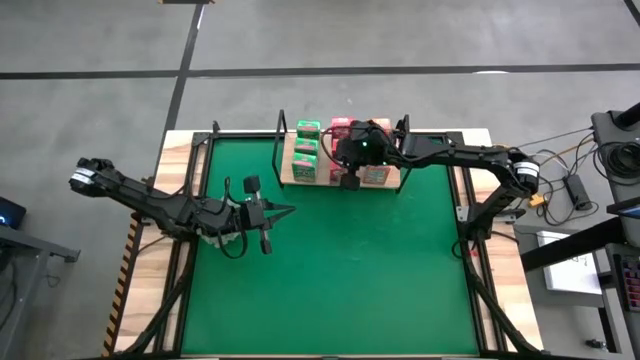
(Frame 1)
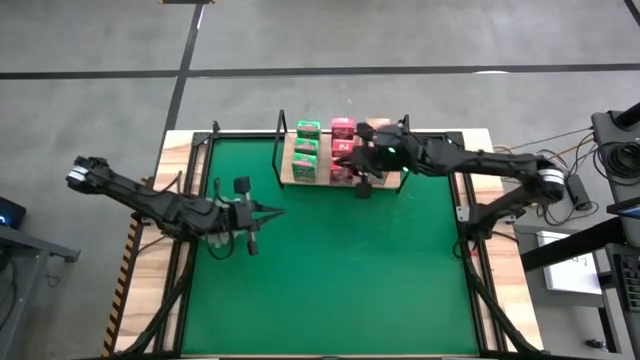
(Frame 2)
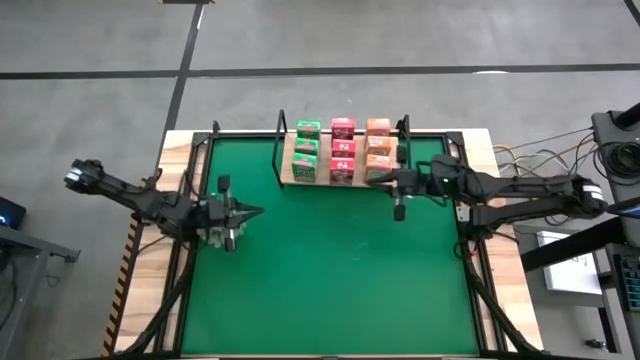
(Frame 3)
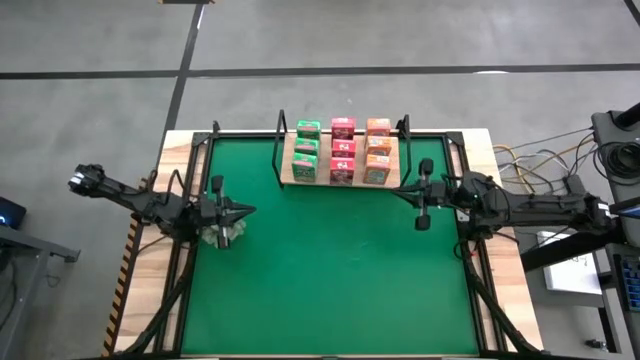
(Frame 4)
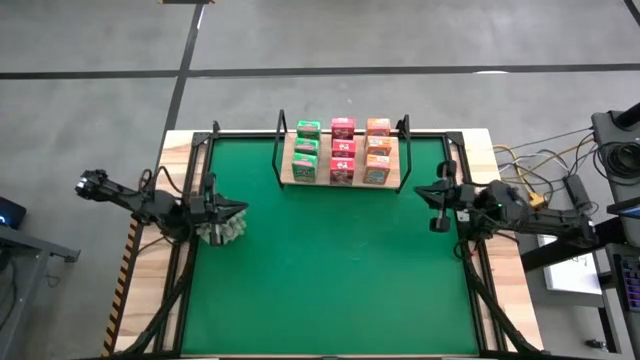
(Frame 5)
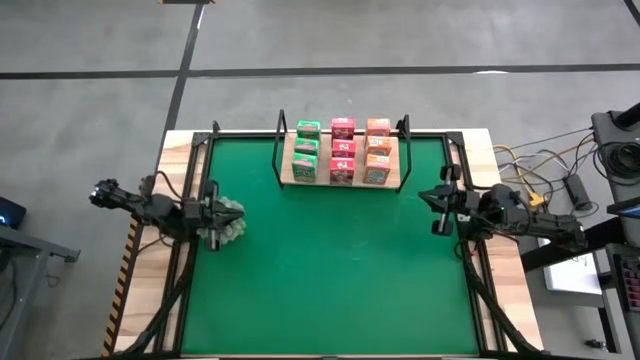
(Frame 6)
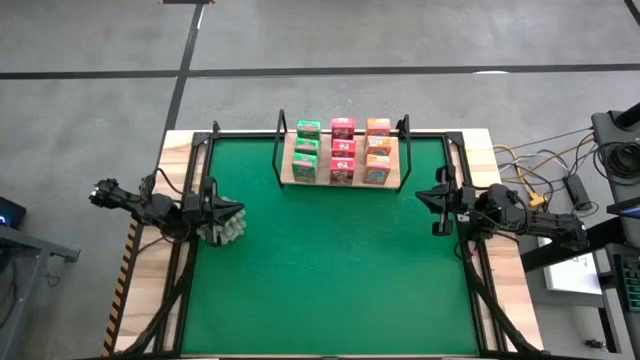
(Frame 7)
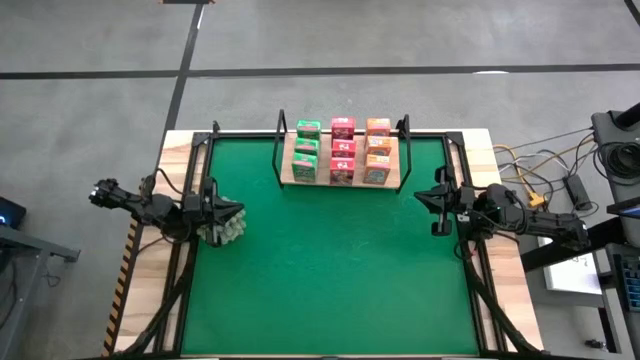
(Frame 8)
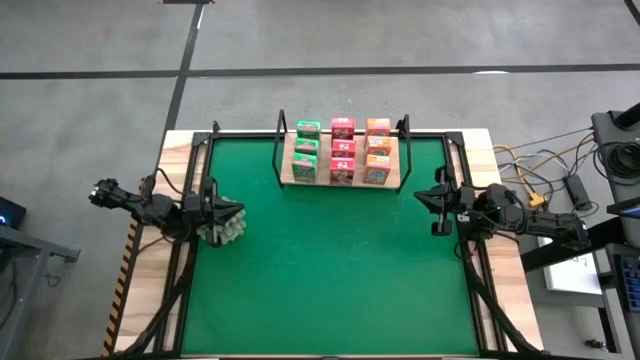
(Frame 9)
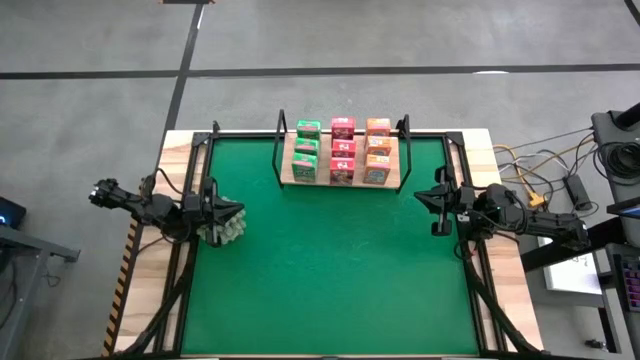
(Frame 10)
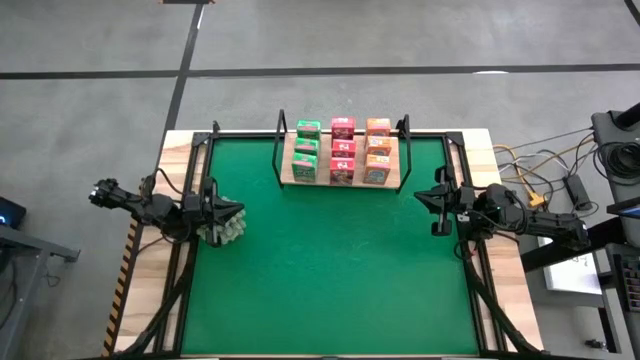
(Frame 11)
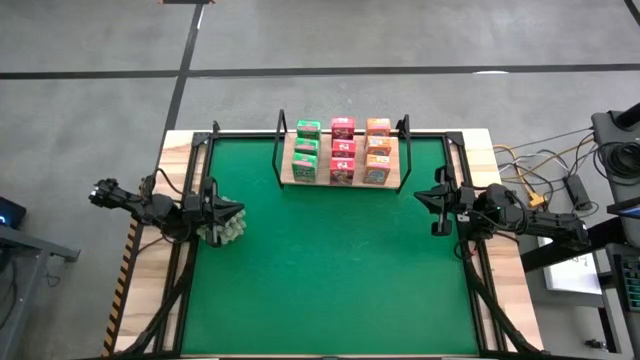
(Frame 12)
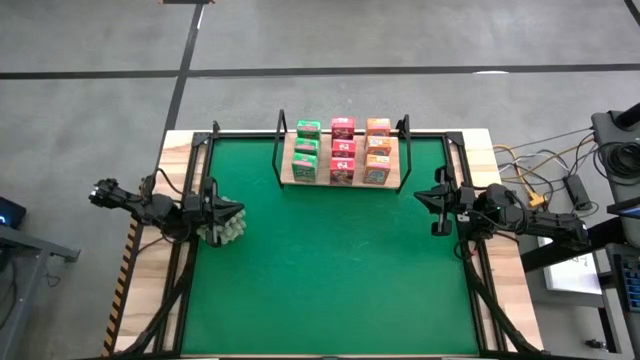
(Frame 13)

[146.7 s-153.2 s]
Task: Stack cereal on shelf
Return to Home Position

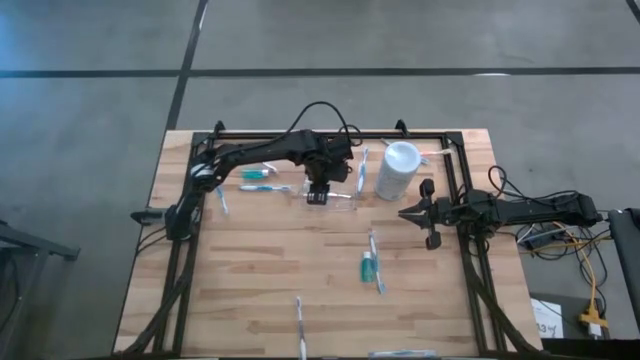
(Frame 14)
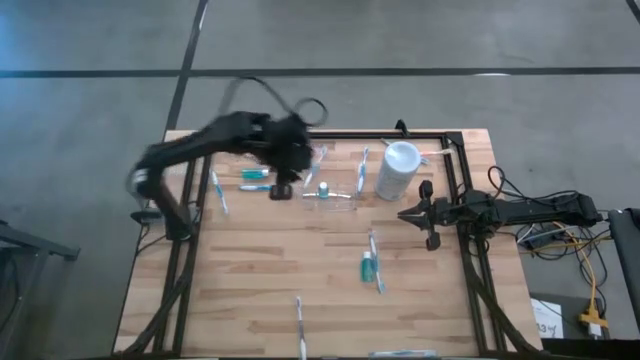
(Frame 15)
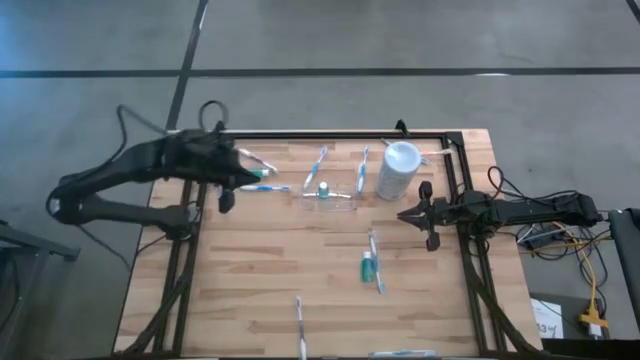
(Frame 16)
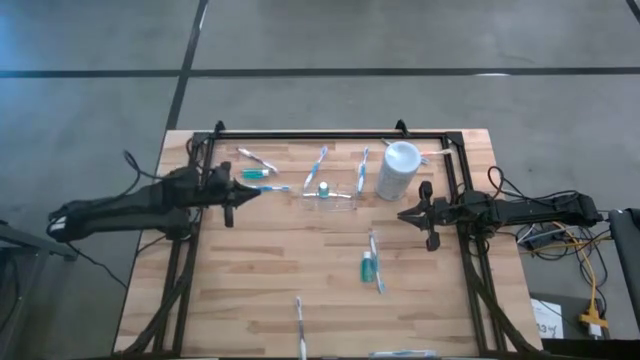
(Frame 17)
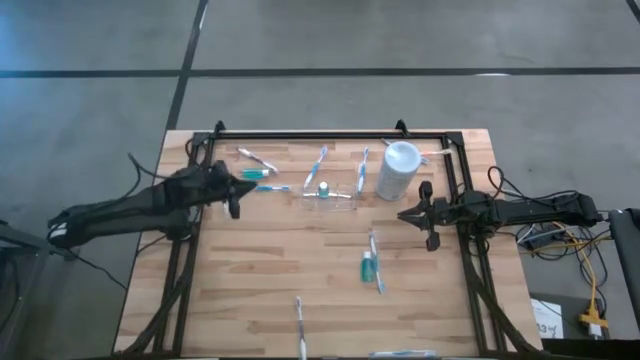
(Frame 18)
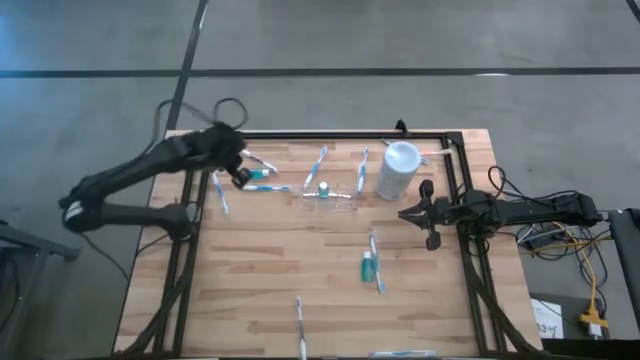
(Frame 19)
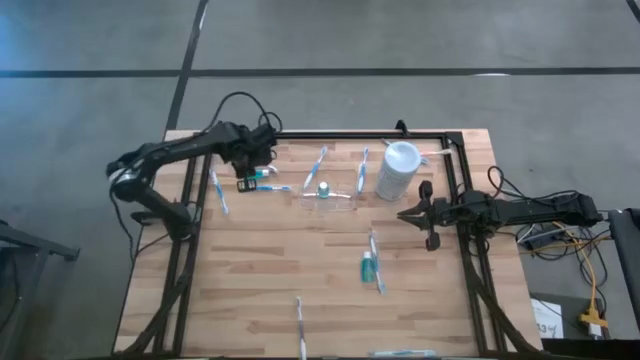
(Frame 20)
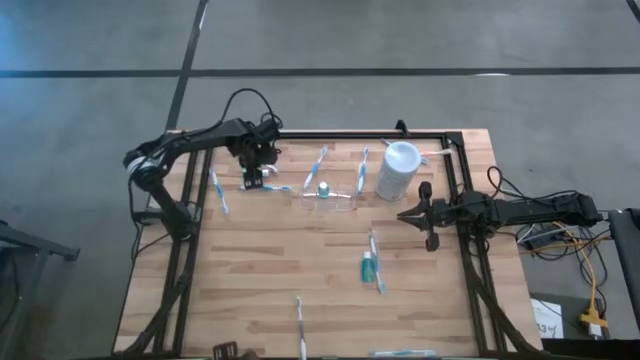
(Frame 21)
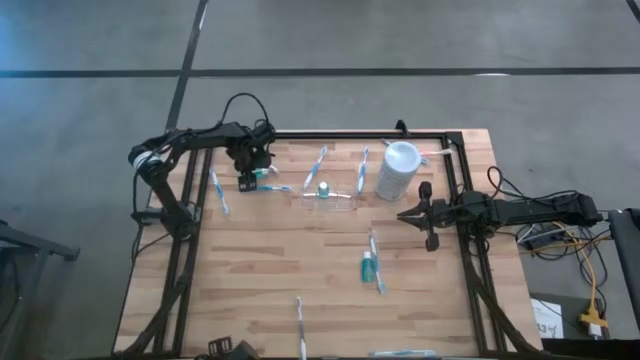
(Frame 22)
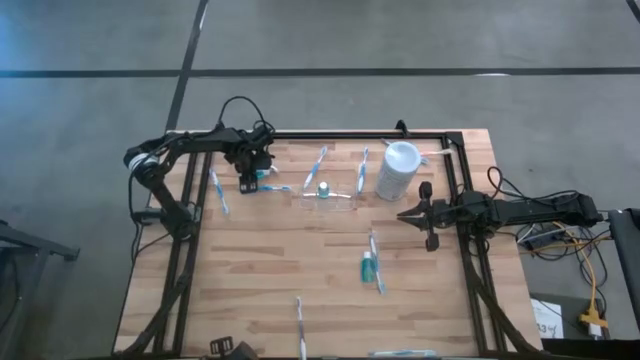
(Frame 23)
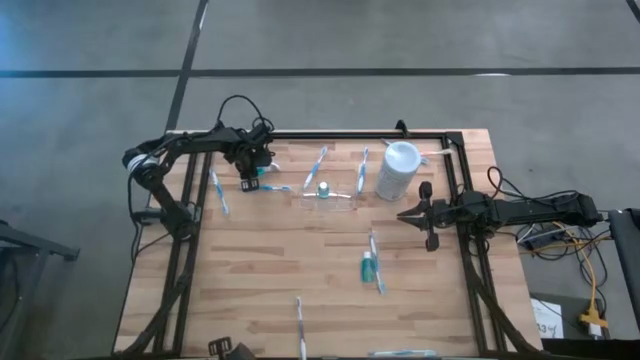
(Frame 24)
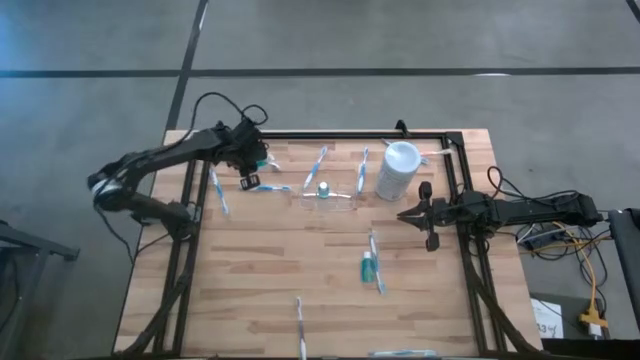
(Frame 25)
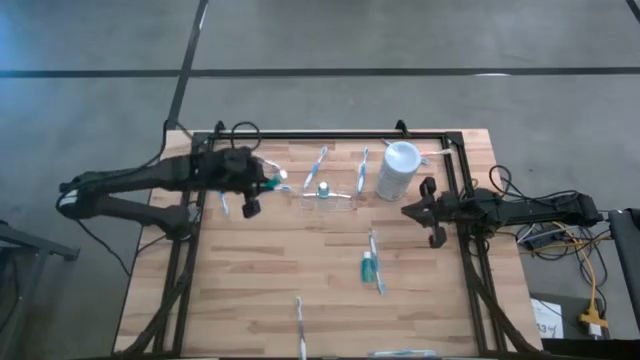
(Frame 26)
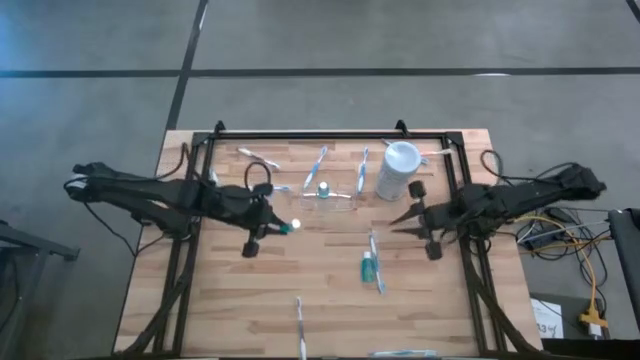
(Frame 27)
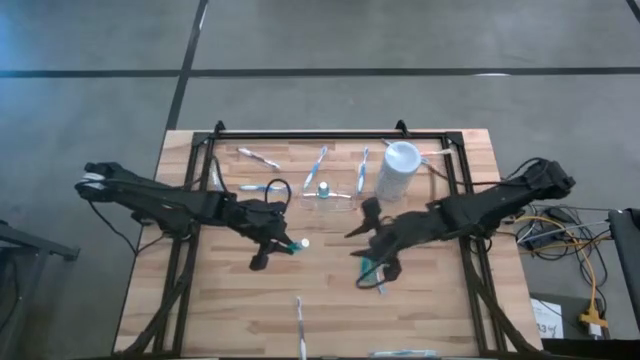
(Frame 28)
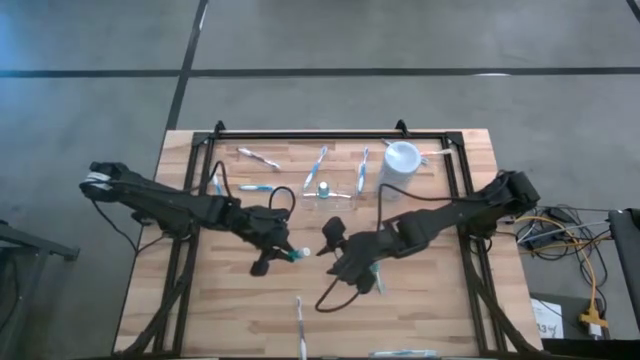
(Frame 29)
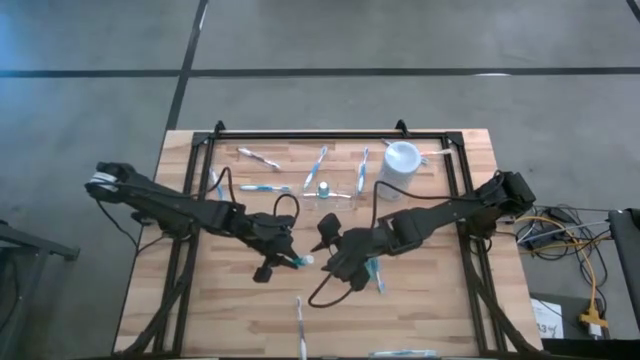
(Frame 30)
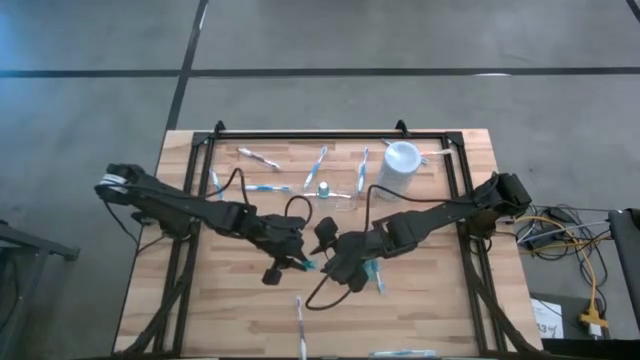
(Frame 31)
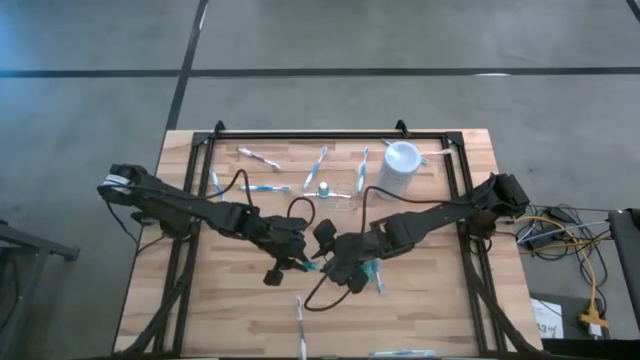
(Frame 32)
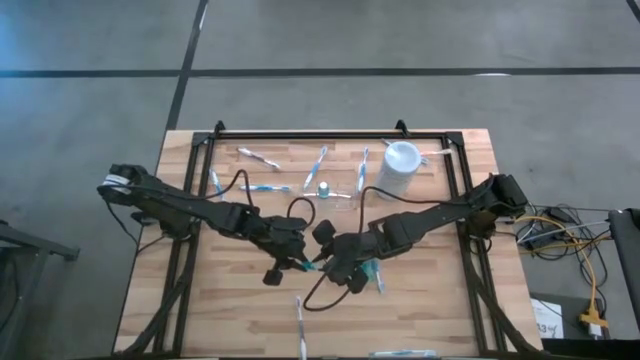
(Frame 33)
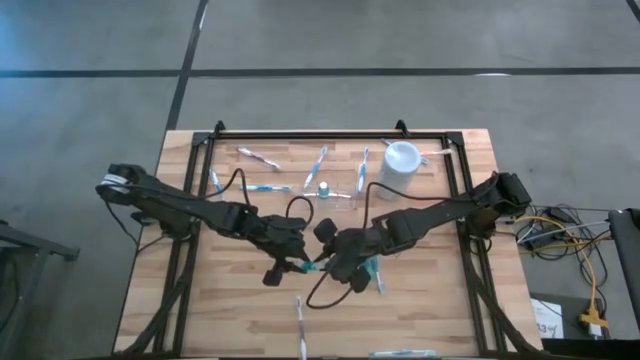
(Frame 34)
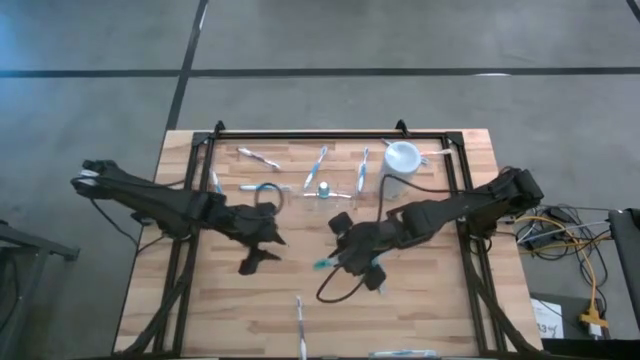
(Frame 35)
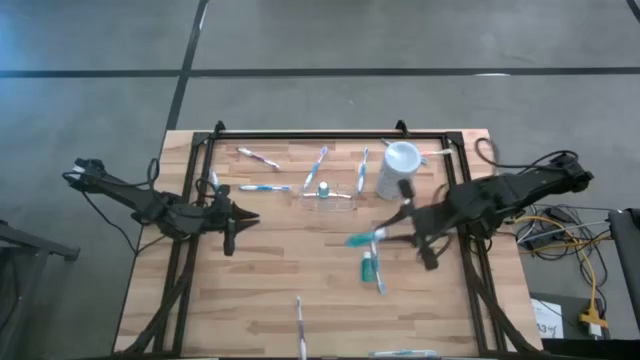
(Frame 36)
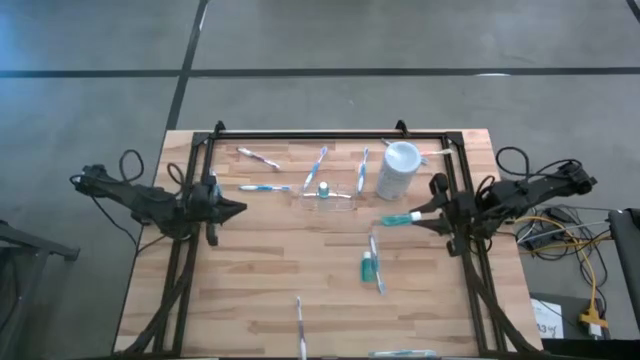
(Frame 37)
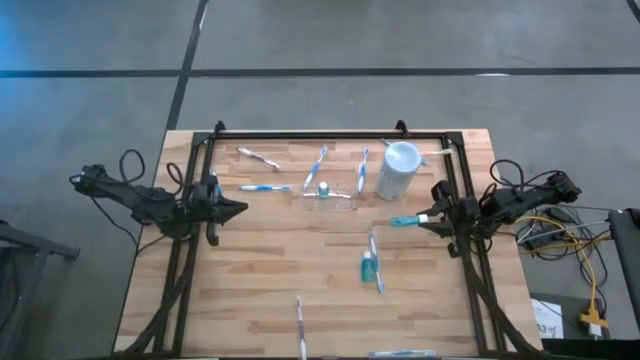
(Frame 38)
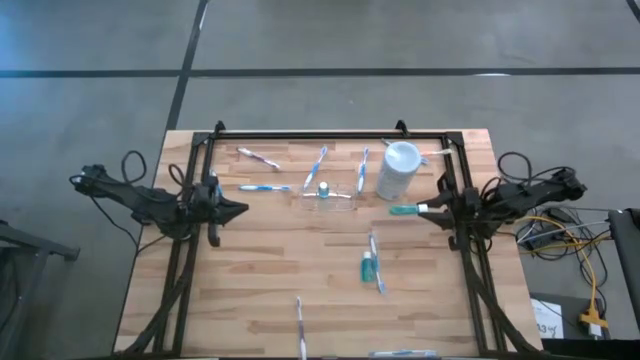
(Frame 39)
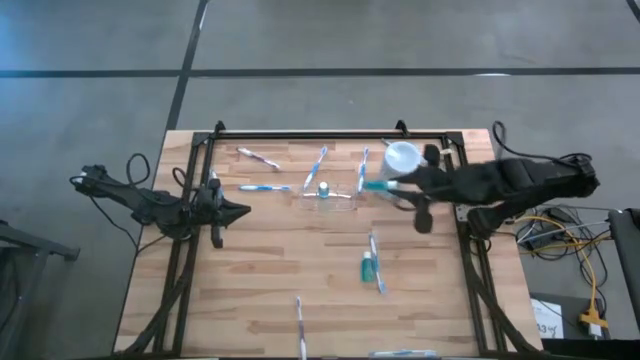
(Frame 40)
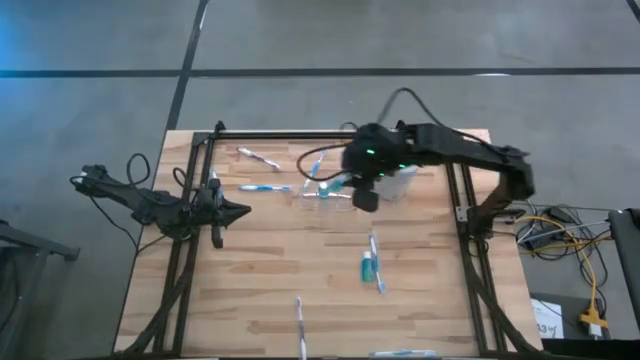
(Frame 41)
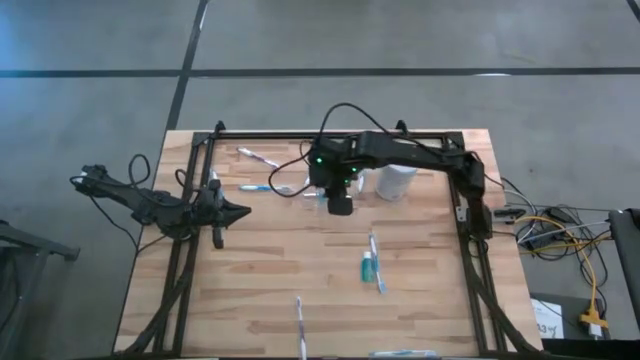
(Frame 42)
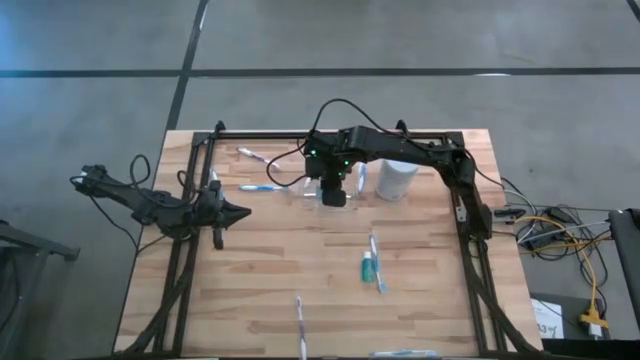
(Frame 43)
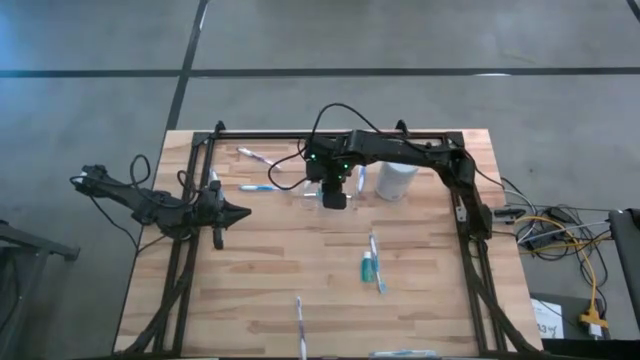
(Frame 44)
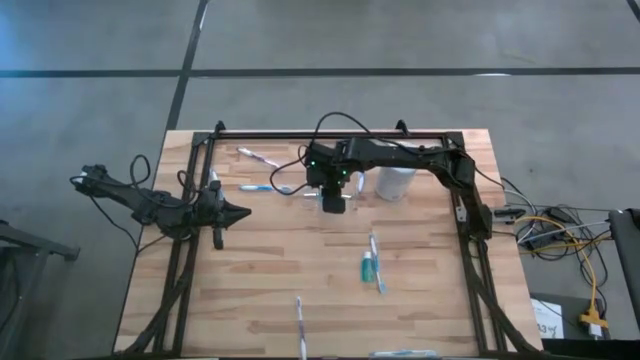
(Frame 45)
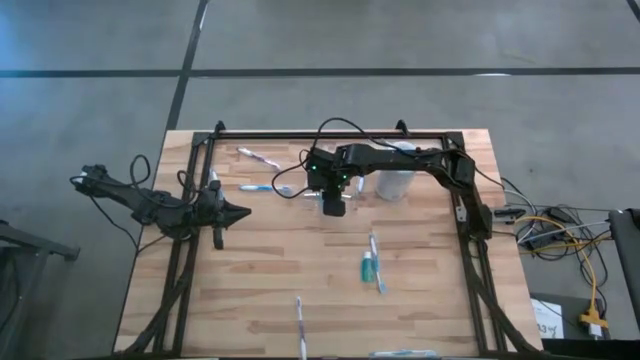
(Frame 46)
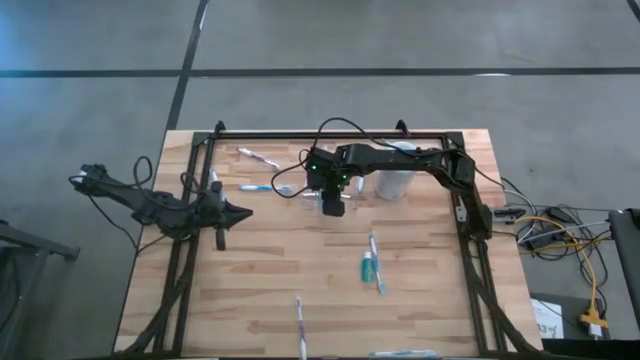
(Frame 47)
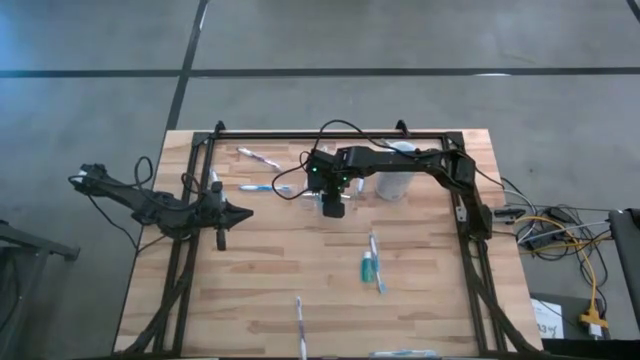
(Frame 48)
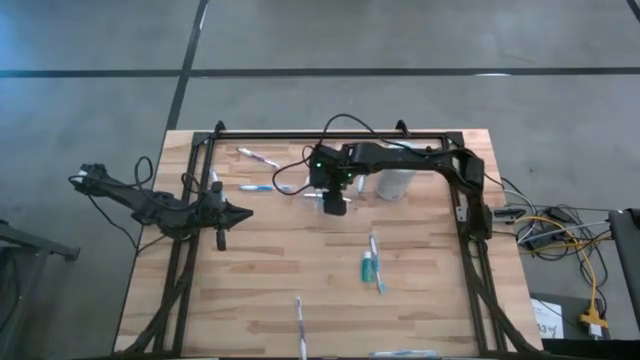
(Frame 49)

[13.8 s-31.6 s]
Task: Pick & Place toothbrushing station
Put the mouthwash into the transparent organizer
